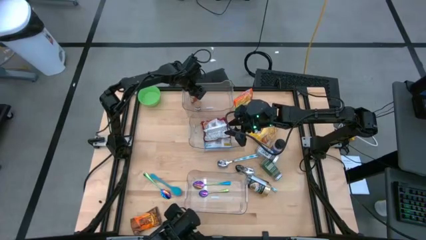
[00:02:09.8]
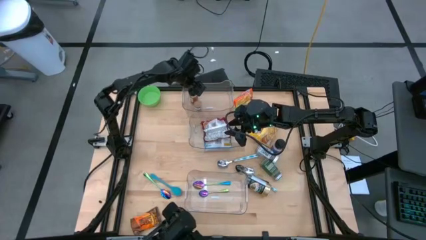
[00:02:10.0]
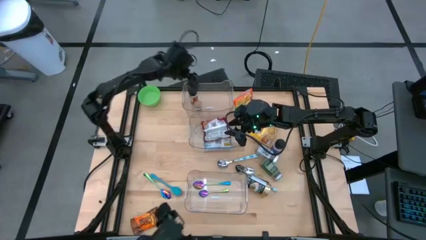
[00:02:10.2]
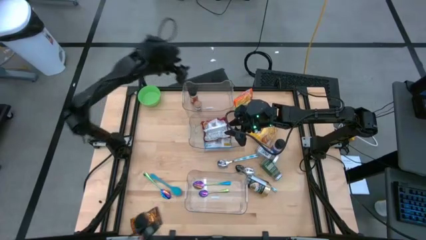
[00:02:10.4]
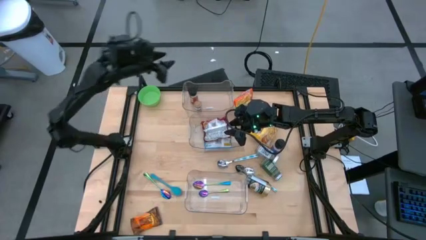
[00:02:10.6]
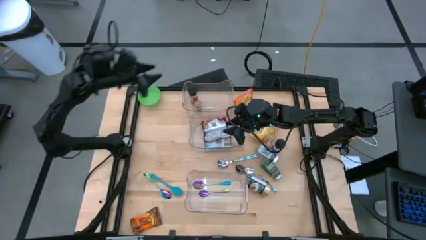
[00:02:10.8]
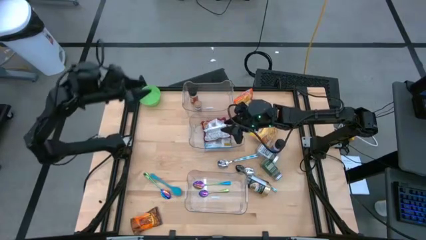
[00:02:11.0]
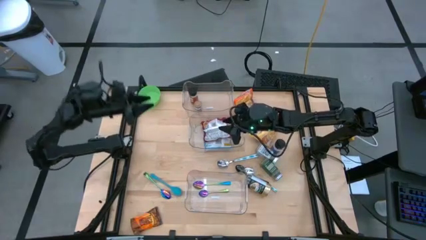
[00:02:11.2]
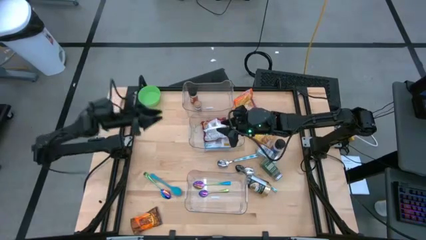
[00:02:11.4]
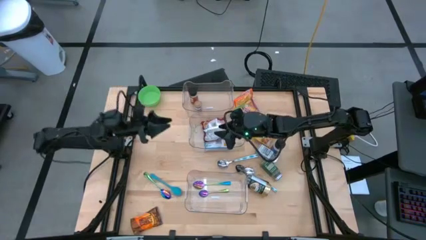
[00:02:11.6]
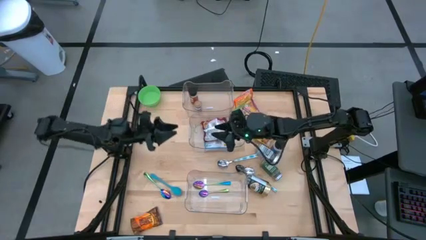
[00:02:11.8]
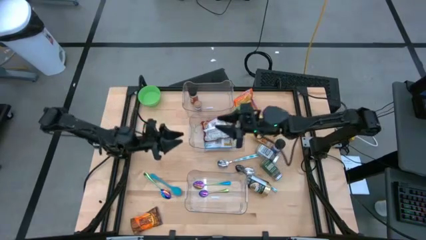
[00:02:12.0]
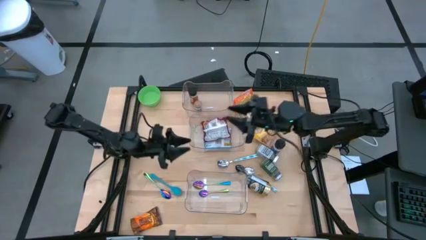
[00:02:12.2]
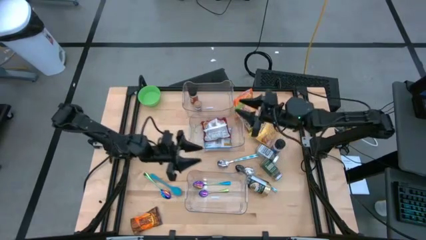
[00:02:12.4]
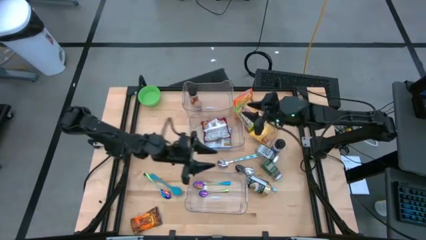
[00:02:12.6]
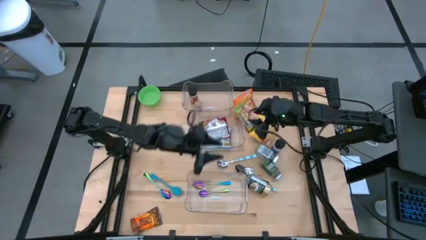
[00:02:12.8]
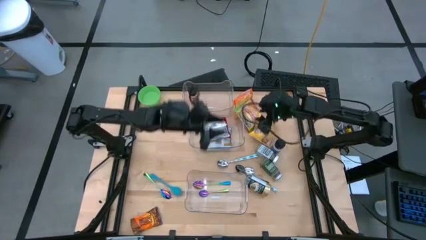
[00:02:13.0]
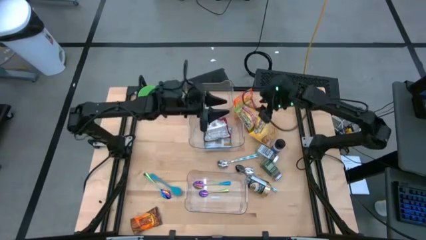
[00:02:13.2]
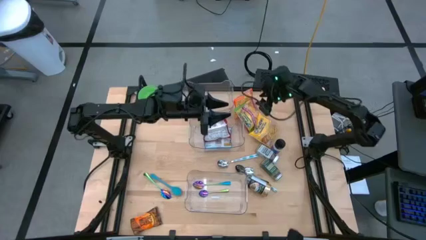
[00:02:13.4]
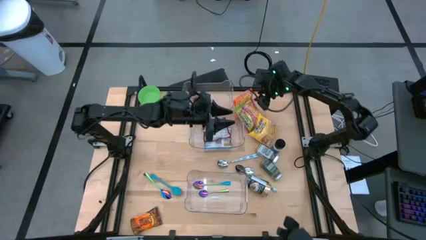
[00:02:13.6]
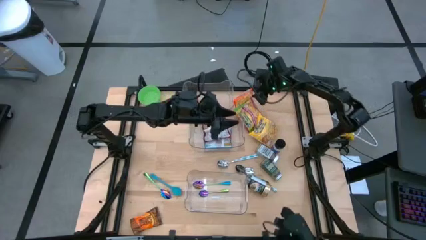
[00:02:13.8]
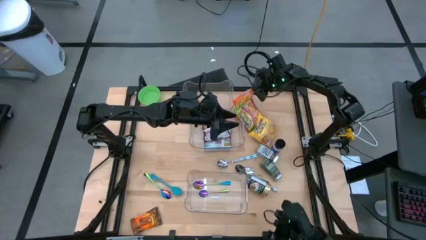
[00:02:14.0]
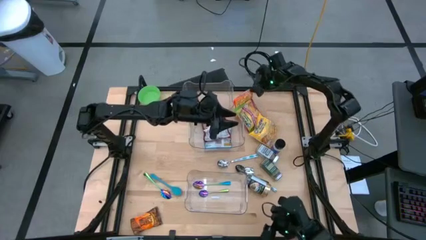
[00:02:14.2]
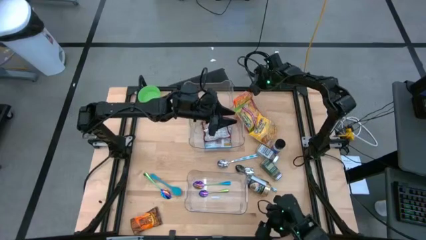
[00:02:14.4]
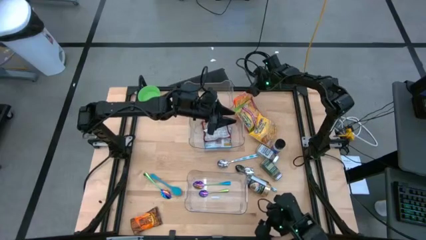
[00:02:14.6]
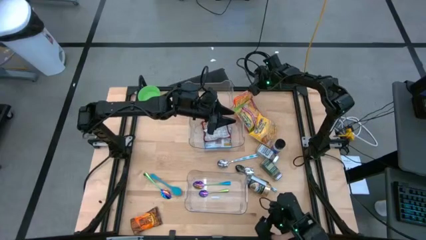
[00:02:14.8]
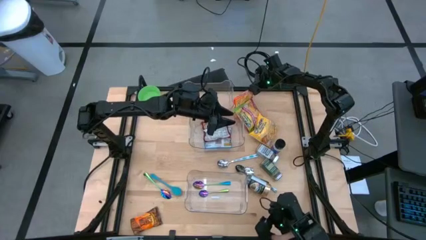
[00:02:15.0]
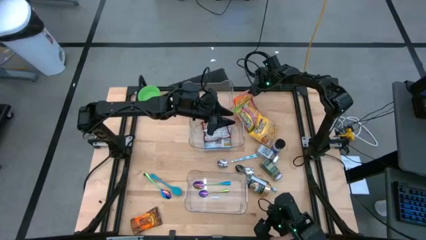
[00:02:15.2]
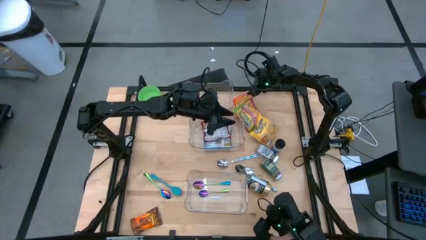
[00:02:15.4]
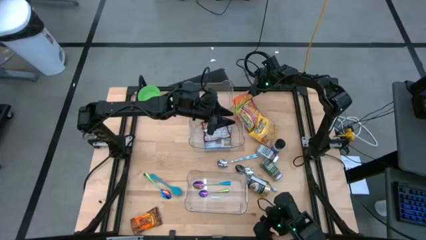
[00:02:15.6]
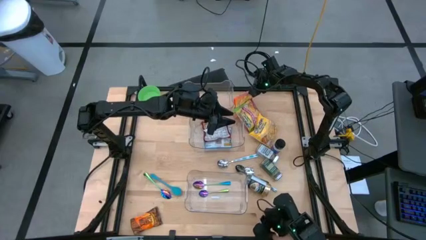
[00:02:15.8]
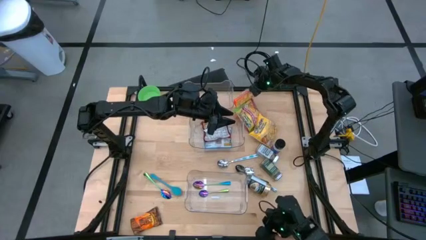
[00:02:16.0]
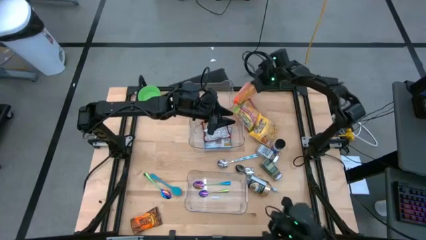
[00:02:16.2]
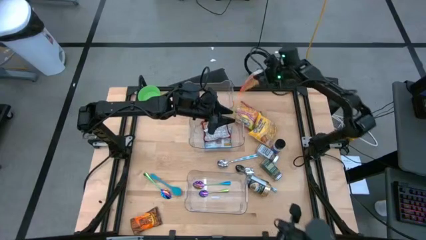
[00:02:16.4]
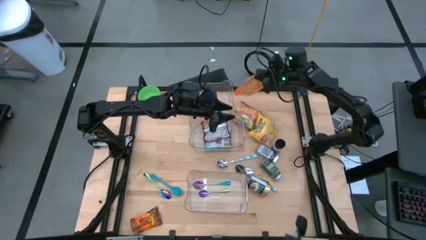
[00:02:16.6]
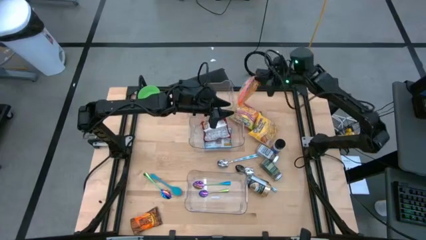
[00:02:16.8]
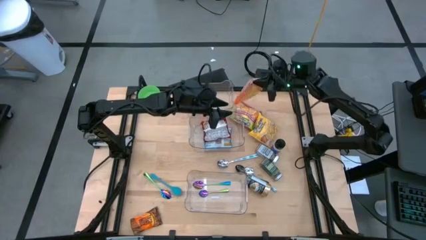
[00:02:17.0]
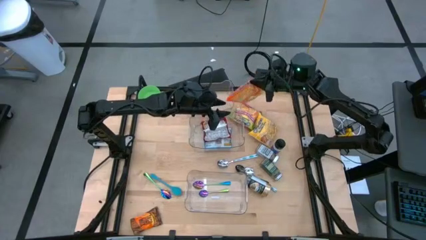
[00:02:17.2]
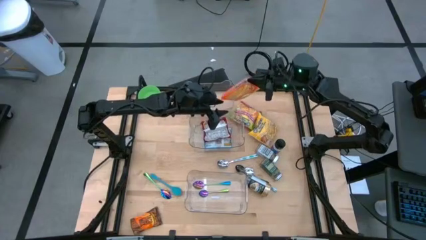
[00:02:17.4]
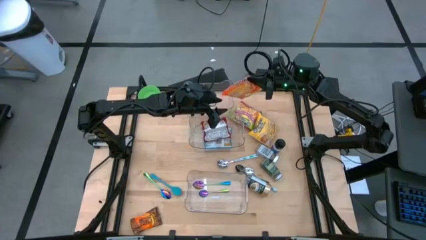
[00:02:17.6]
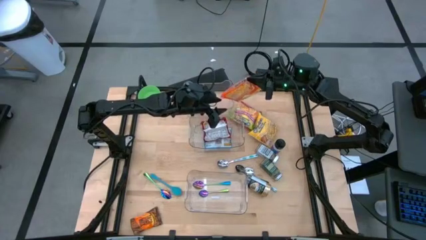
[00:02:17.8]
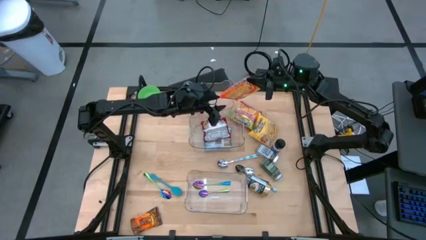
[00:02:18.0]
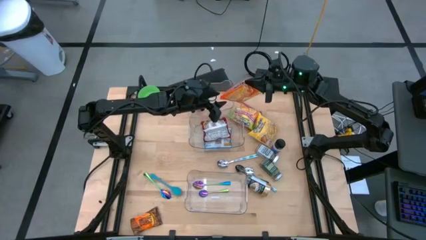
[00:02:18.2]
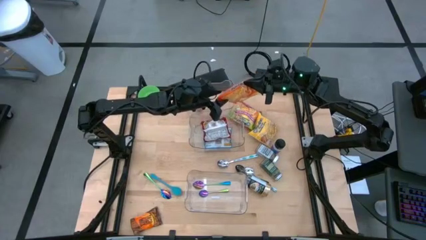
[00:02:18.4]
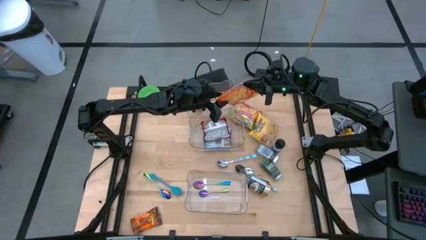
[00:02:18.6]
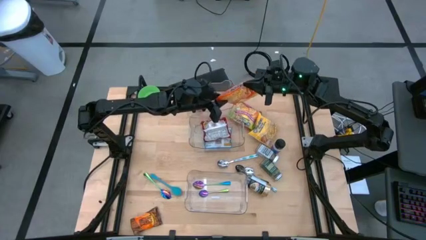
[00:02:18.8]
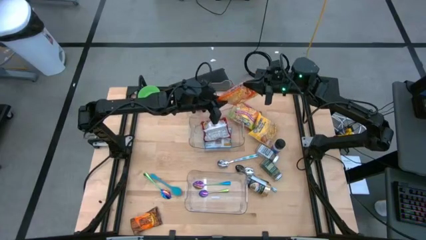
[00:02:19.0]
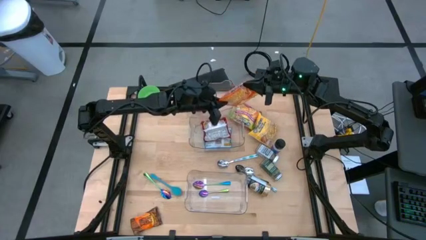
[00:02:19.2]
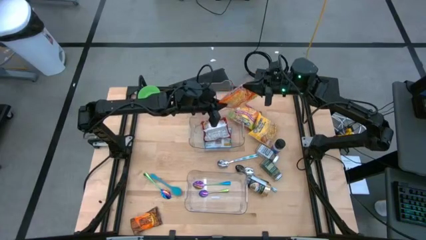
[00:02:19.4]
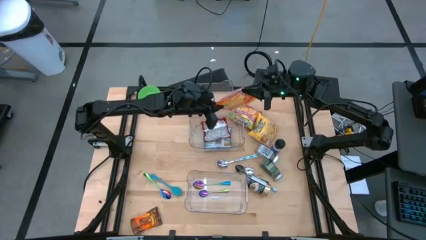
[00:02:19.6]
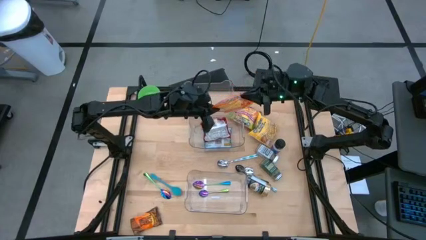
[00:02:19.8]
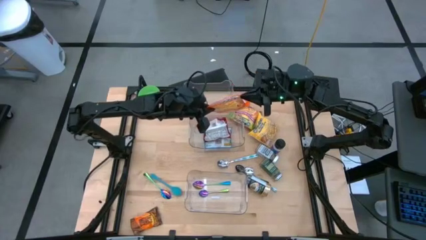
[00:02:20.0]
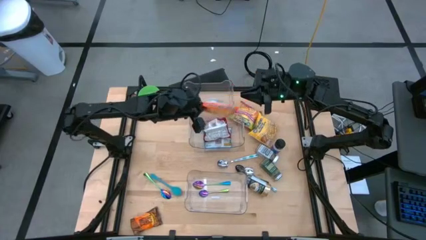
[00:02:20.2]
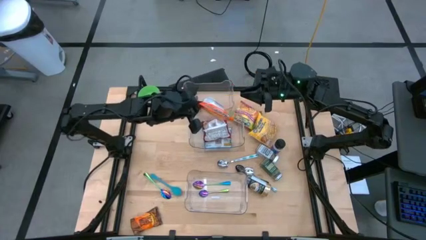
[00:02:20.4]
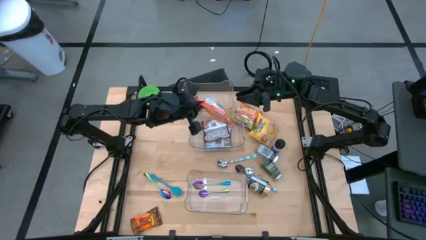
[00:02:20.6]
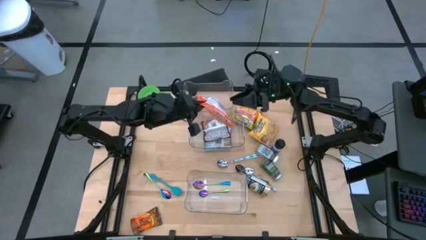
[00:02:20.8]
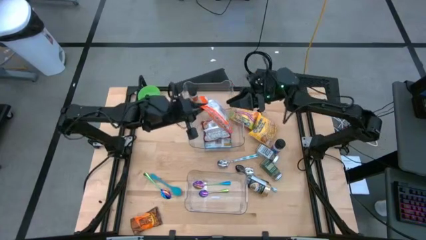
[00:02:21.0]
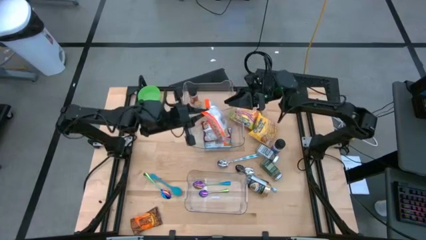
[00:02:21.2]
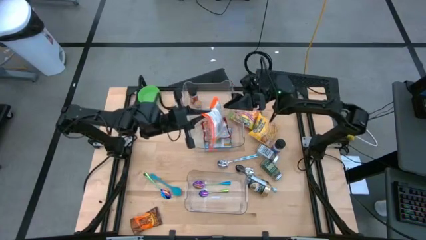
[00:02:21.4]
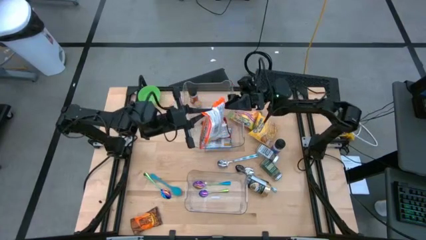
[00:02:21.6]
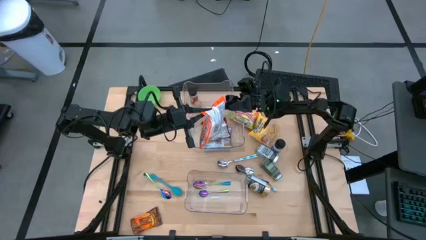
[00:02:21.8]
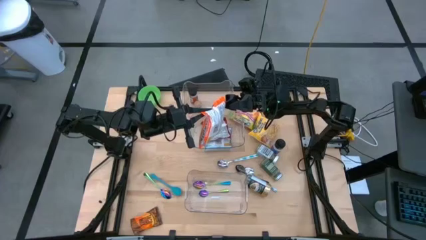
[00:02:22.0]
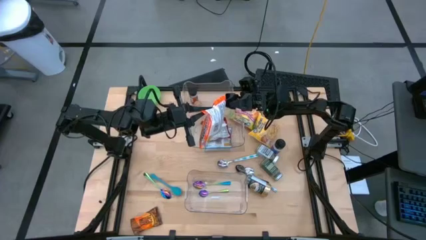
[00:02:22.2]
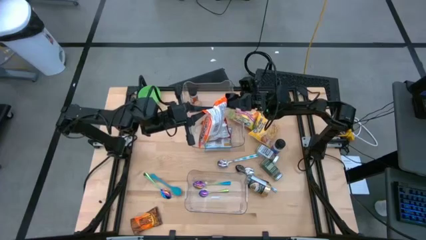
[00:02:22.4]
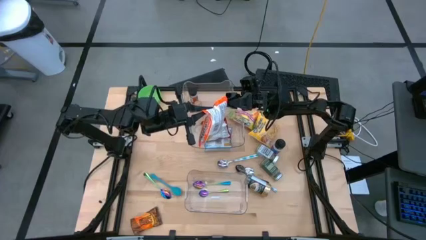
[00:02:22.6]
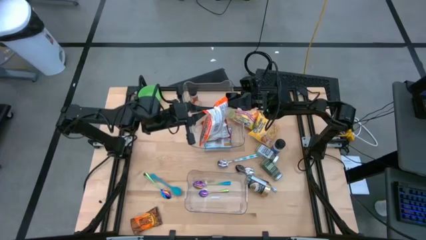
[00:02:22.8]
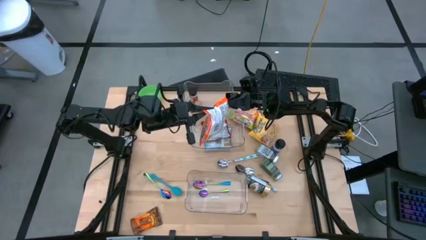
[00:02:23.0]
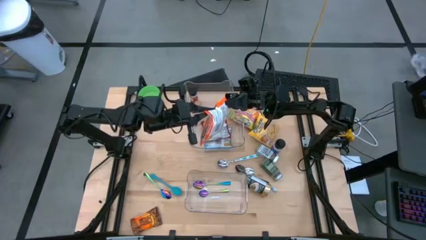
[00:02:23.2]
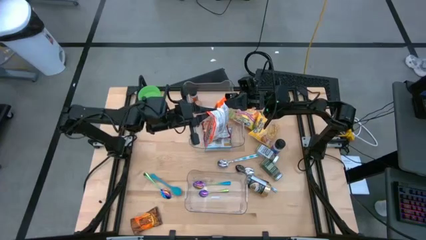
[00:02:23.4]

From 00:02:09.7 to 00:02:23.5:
Task: Pick & Place Food Item
Put the orange noodle pack into the middle transparent bin
